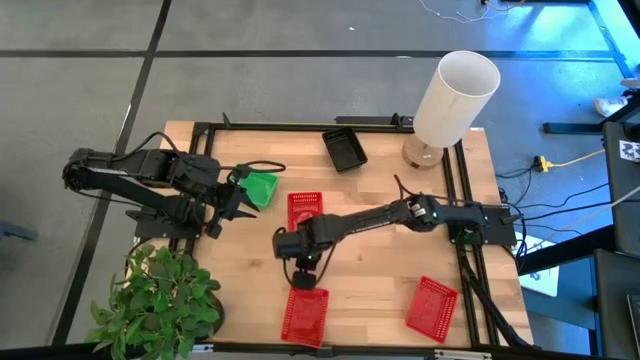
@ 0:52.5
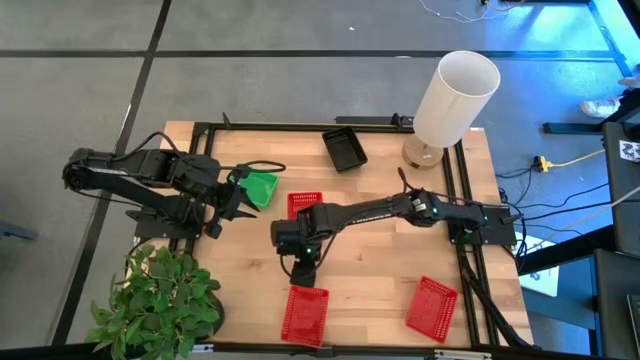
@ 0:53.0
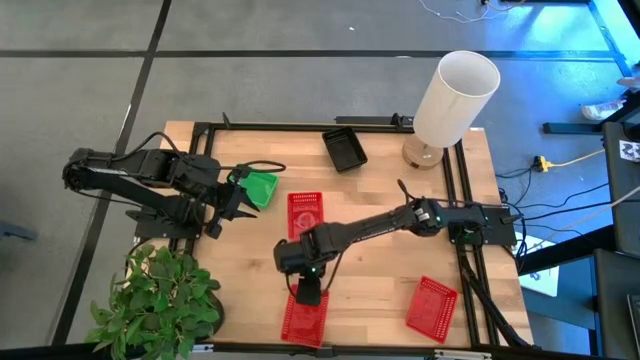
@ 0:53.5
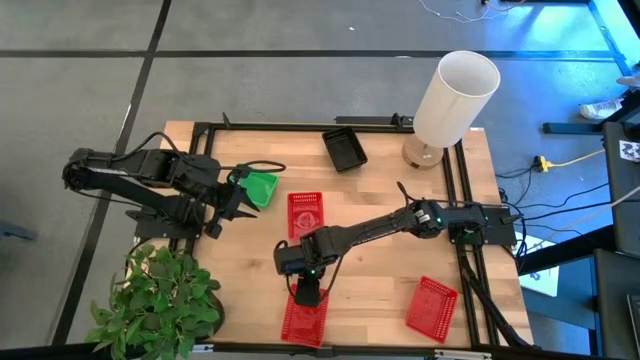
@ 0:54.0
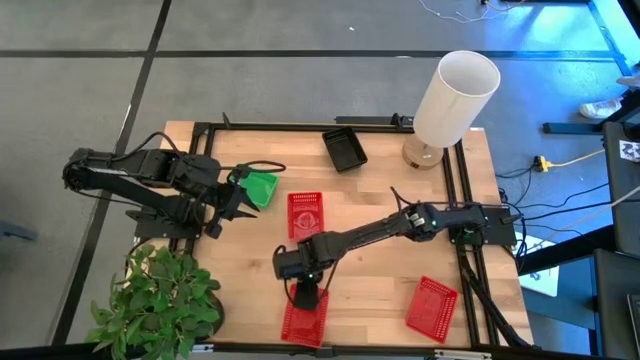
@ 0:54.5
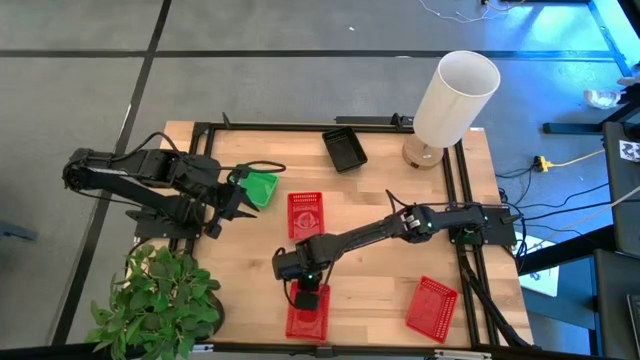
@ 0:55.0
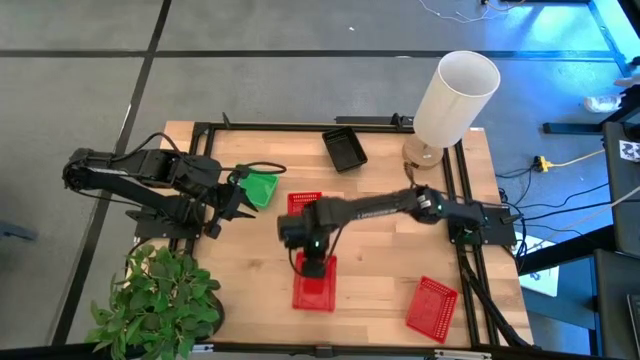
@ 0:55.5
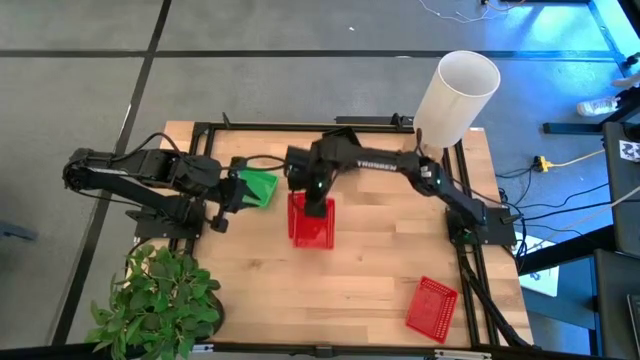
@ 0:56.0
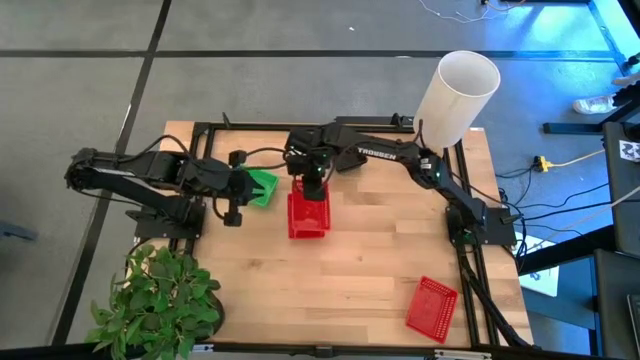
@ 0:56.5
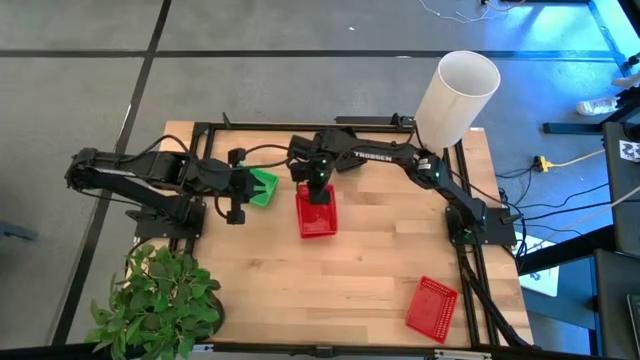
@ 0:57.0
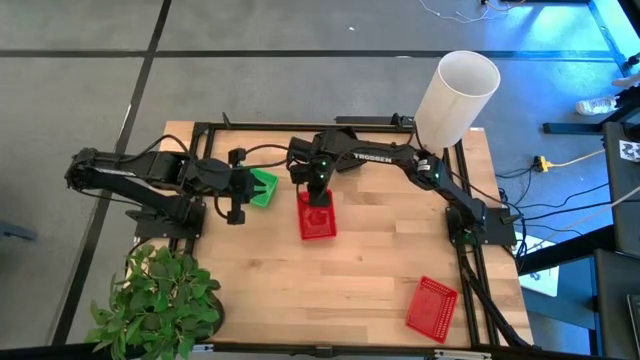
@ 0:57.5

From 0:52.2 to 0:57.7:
Stack the bottom left red bin on the top red bin

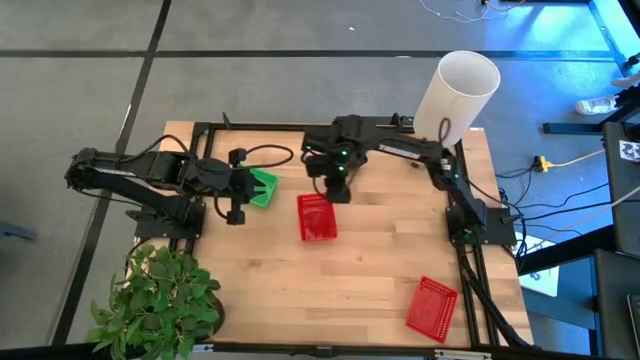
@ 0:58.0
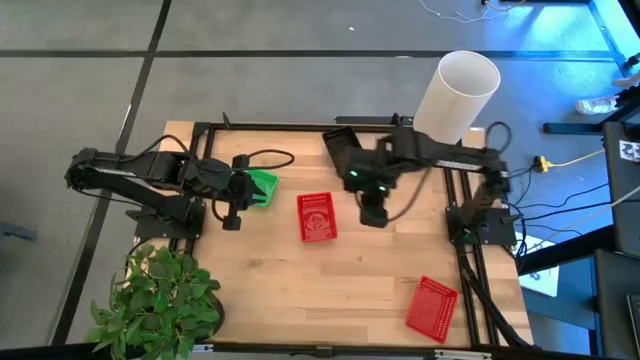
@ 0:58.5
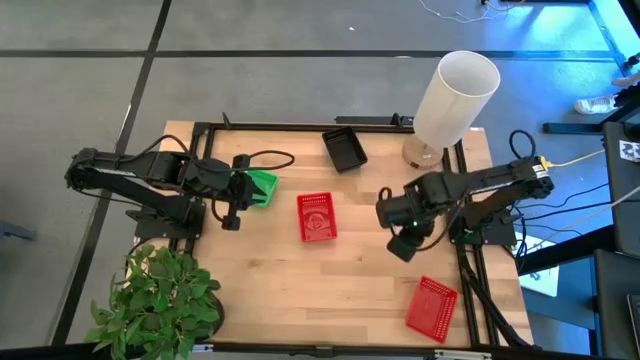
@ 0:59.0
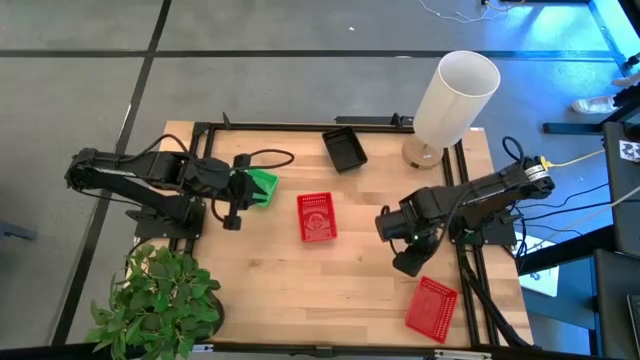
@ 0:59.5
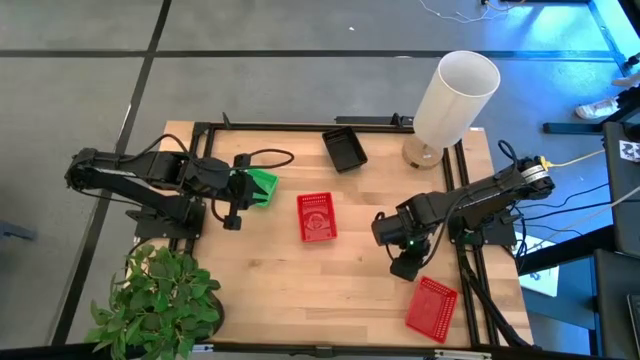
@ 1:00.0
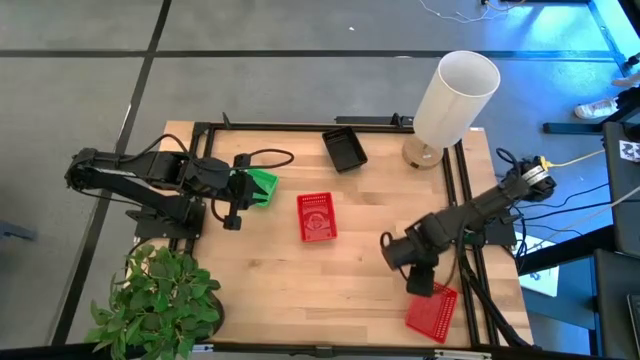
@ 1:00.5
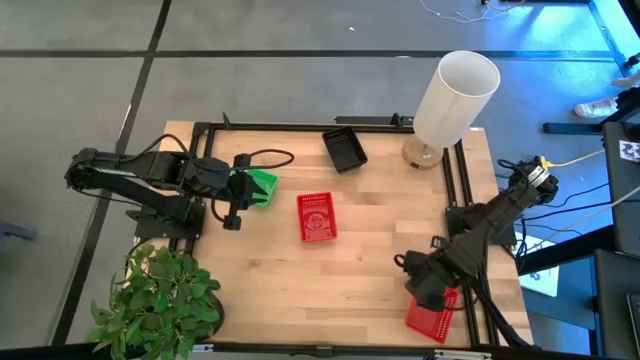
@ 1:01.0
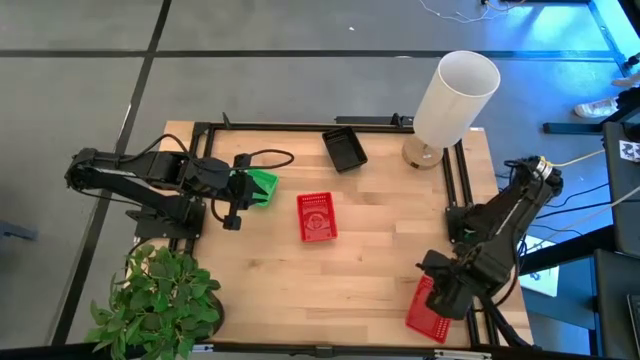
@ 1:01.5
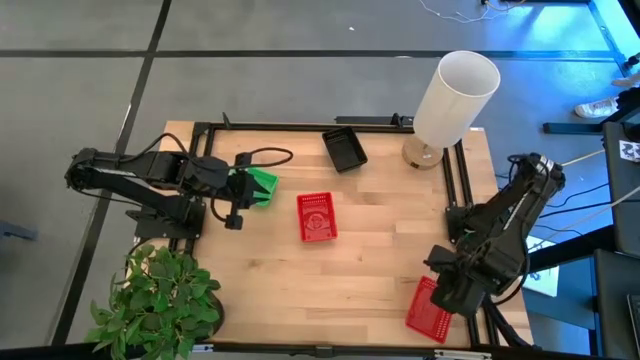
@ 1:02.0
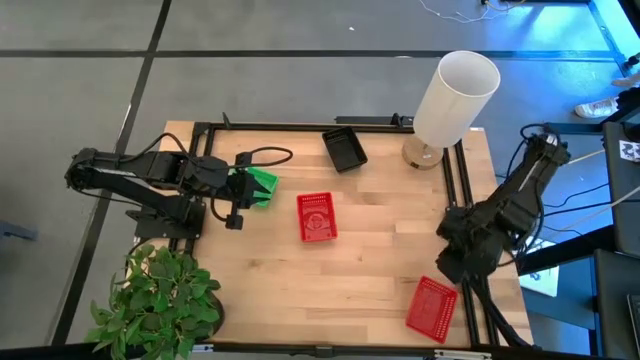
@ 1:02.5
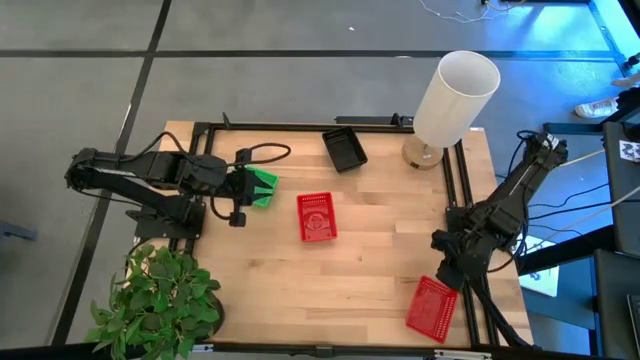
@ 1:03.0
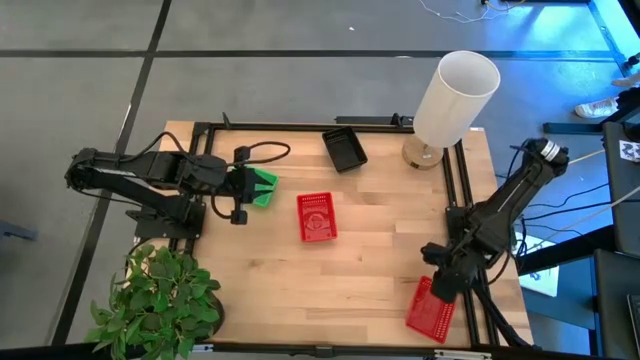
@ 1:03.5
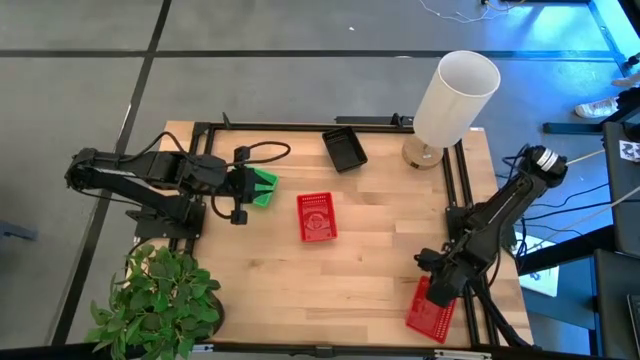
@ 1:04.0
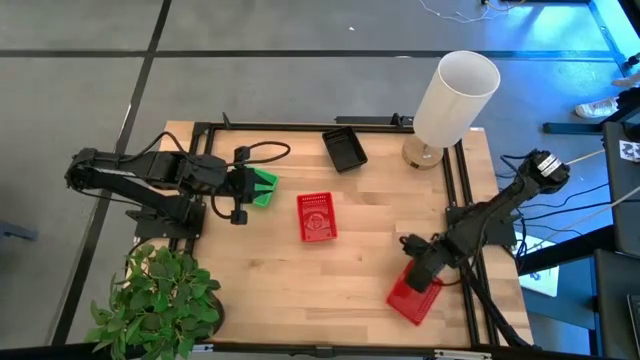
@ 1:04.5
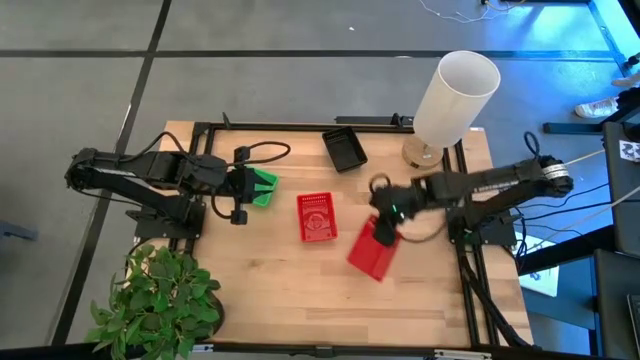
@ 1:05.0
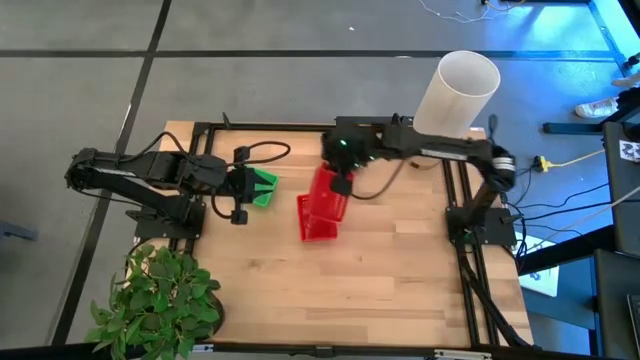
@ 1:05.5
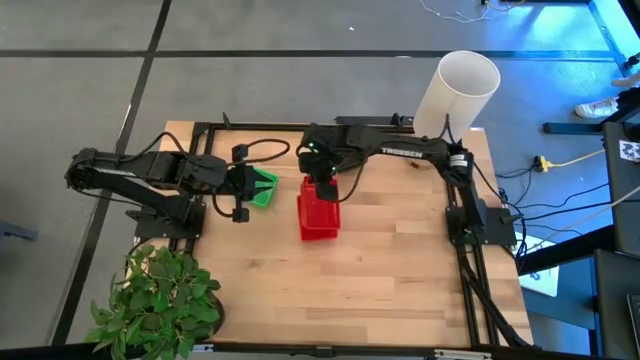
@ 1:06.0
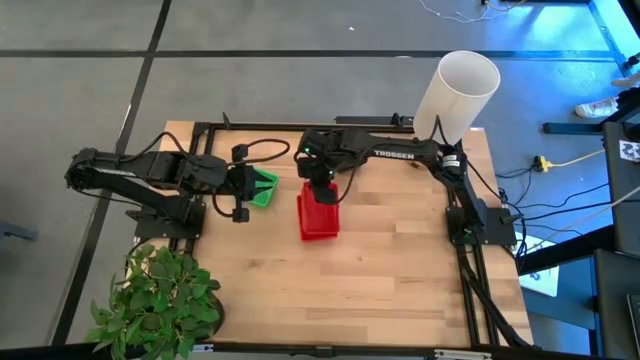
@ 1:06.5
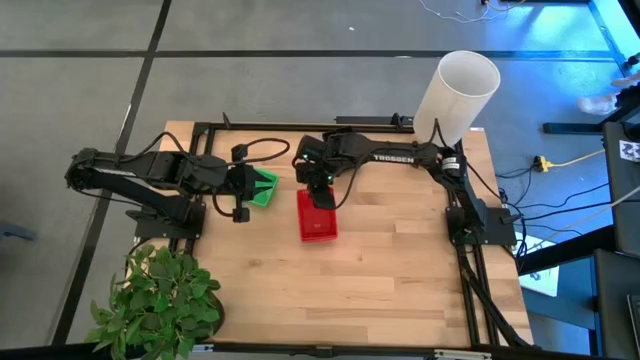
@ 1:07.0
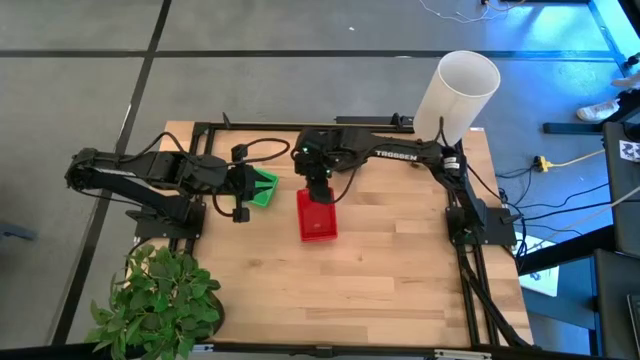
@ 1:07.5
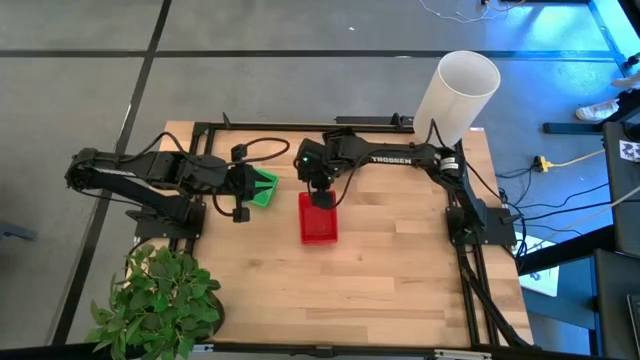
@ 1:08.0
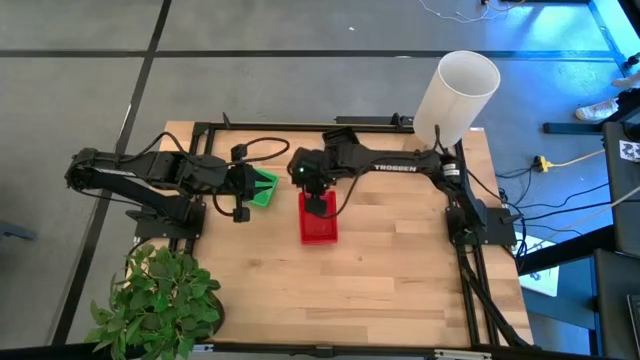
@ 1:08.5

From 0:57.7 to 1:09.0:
Stack the right red bin on the red bins

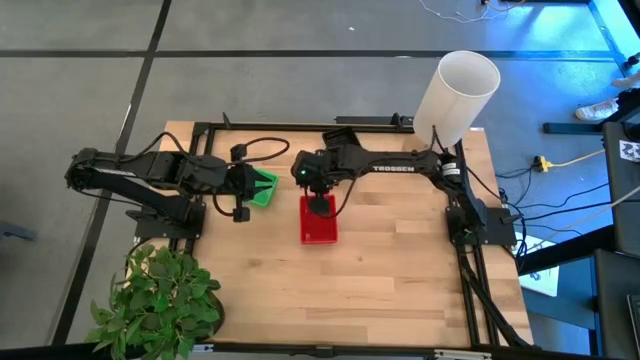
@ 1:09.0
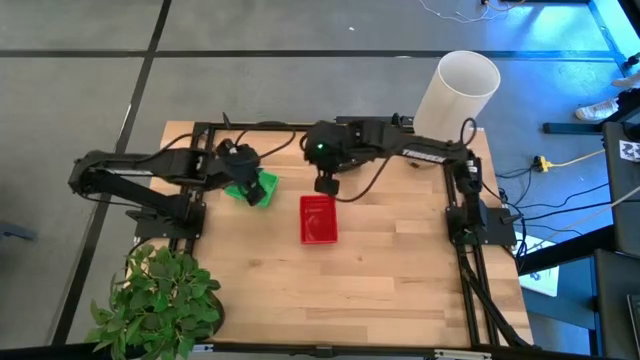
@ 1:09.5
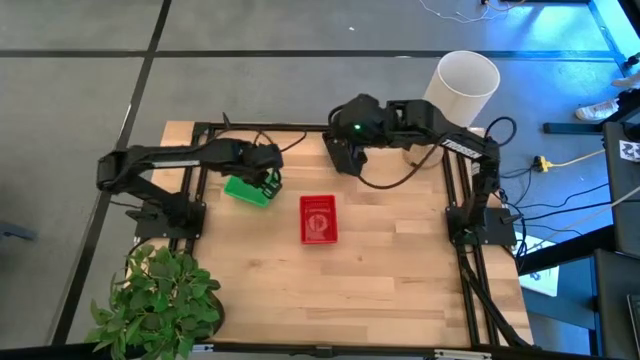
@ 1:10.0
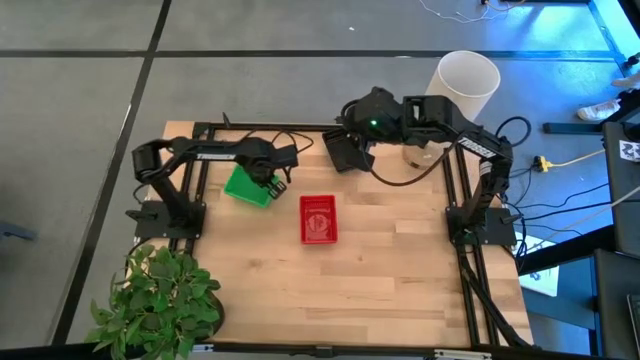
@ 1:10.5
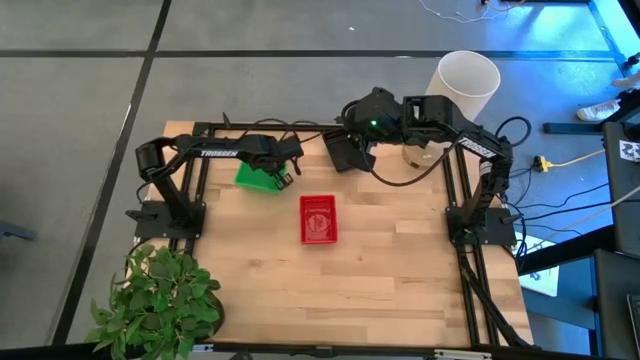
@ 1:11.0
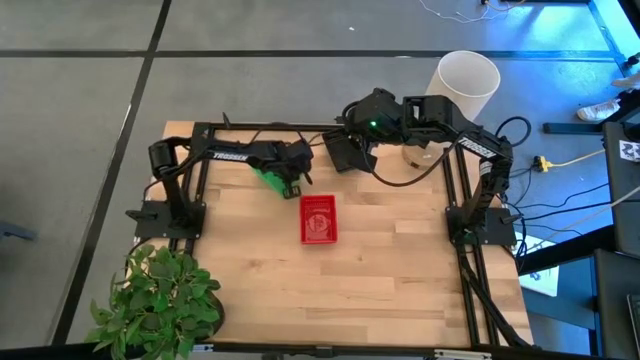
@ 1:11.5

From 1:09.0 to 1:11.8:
Adjust the green bins
